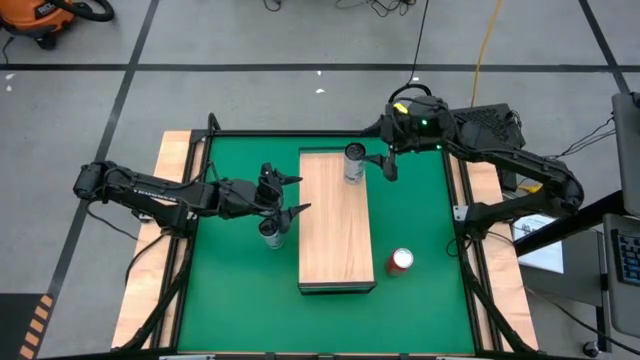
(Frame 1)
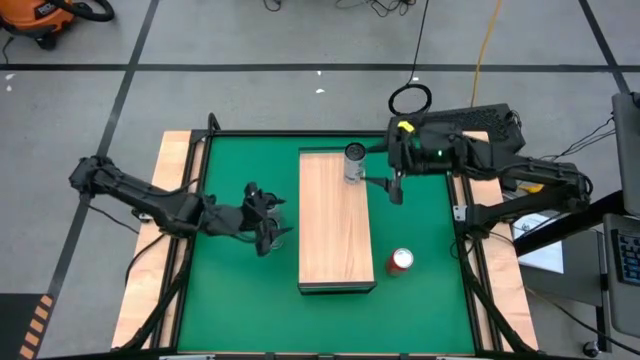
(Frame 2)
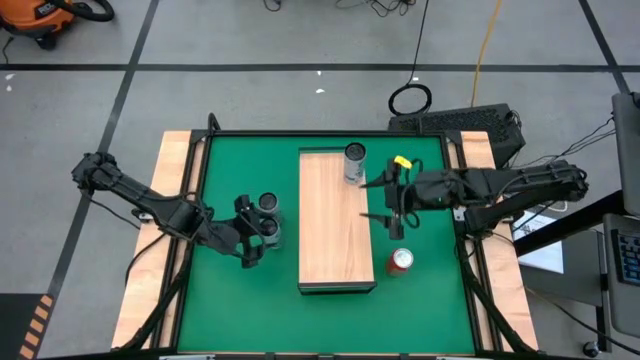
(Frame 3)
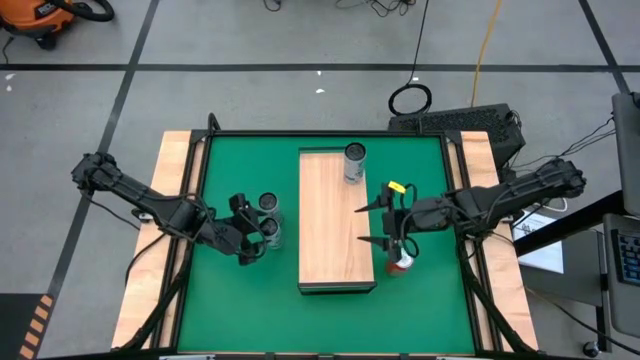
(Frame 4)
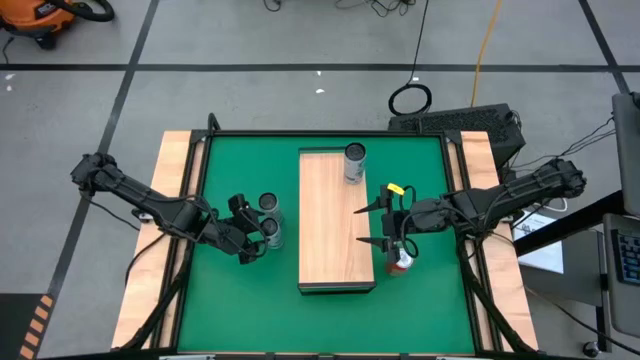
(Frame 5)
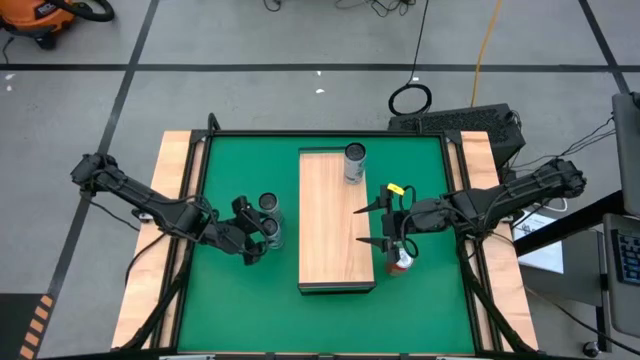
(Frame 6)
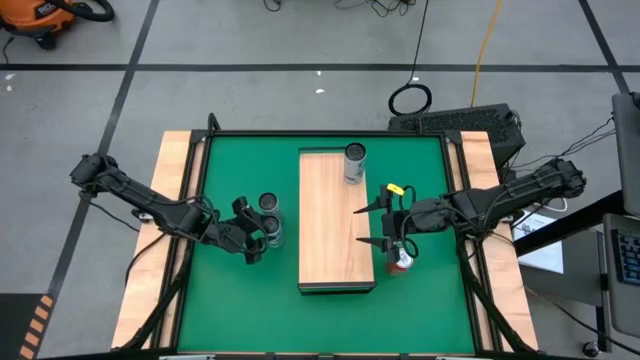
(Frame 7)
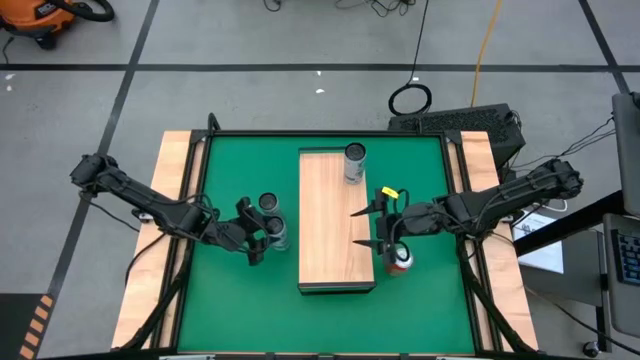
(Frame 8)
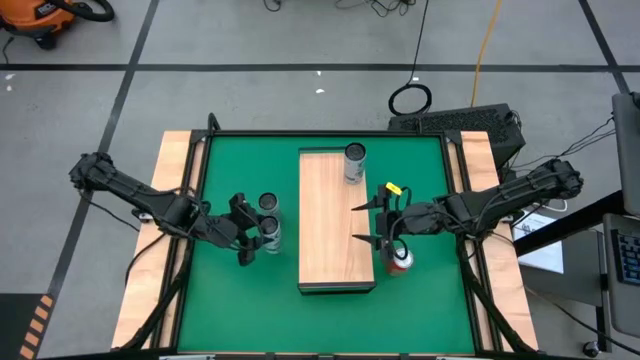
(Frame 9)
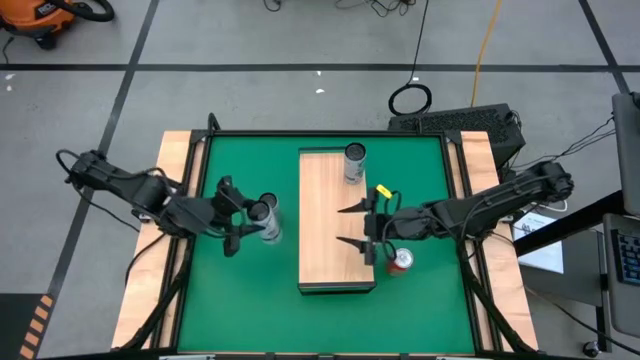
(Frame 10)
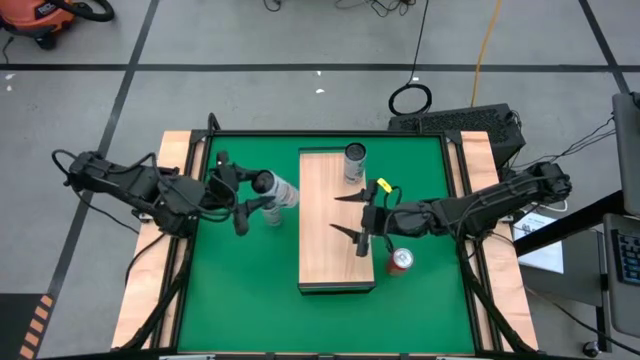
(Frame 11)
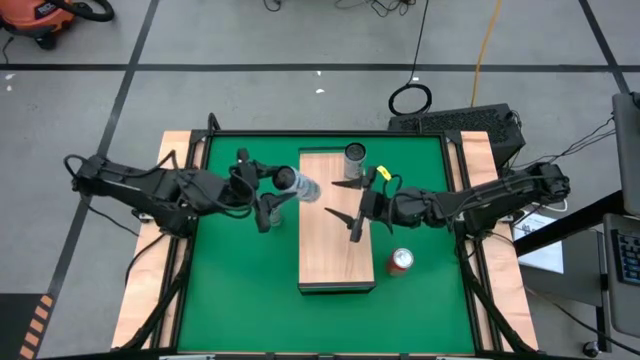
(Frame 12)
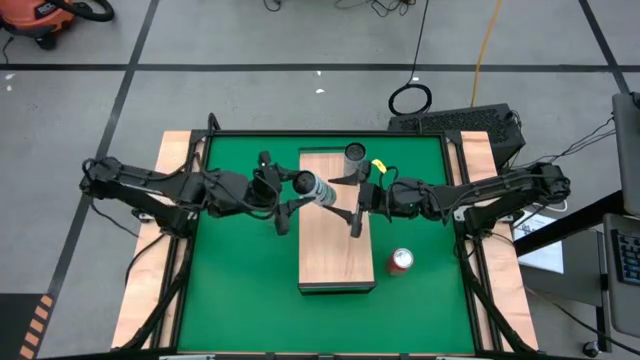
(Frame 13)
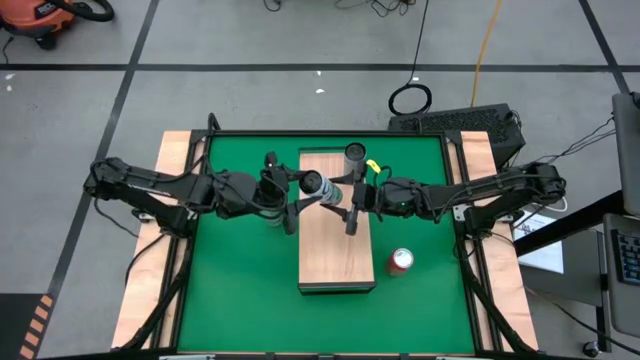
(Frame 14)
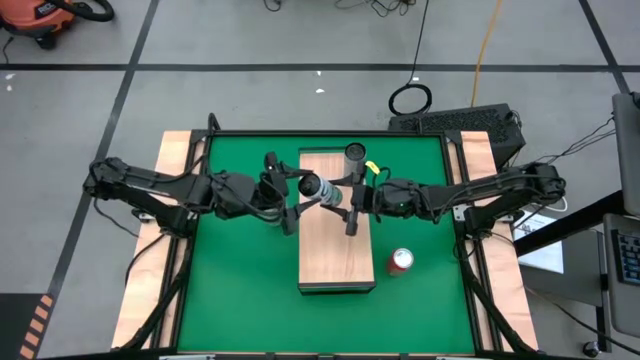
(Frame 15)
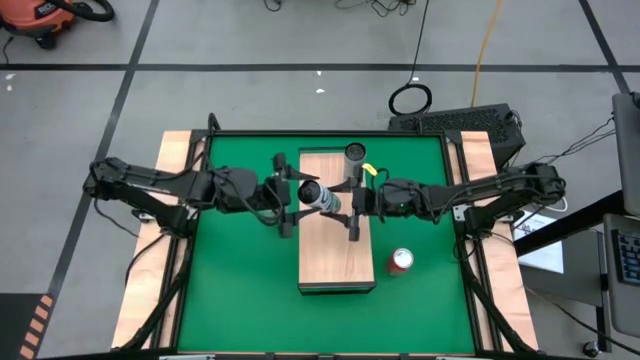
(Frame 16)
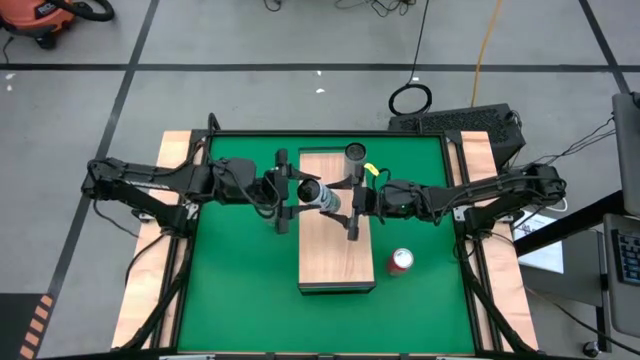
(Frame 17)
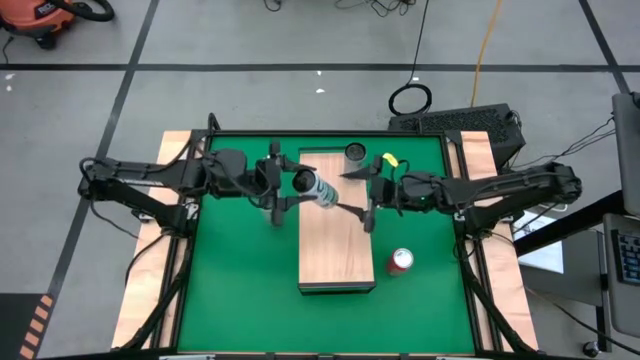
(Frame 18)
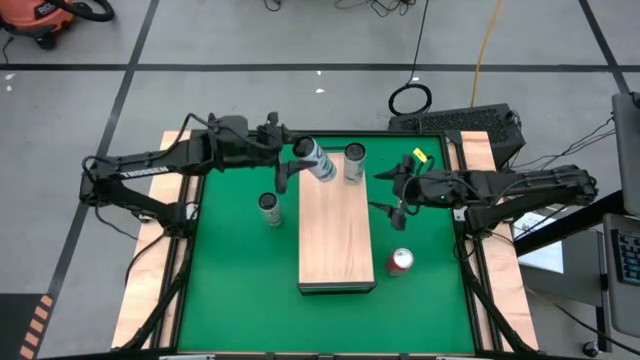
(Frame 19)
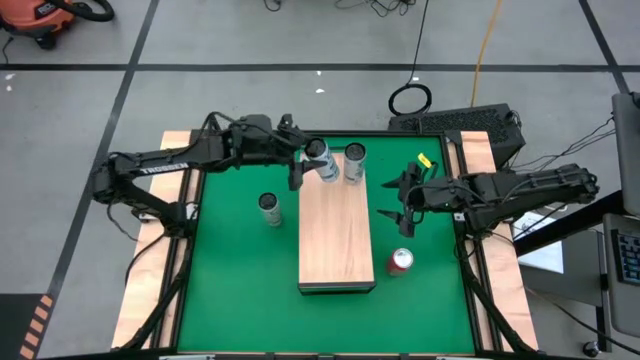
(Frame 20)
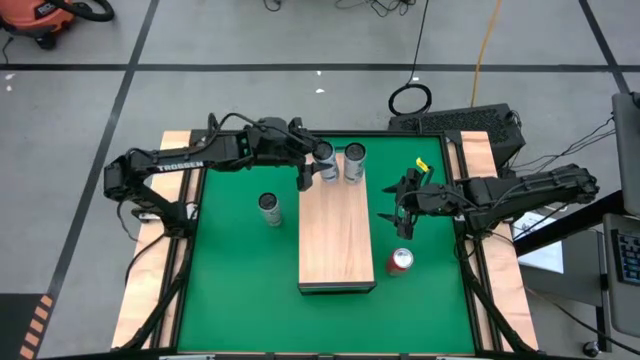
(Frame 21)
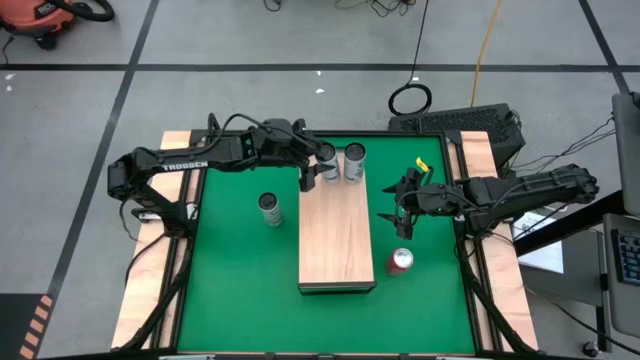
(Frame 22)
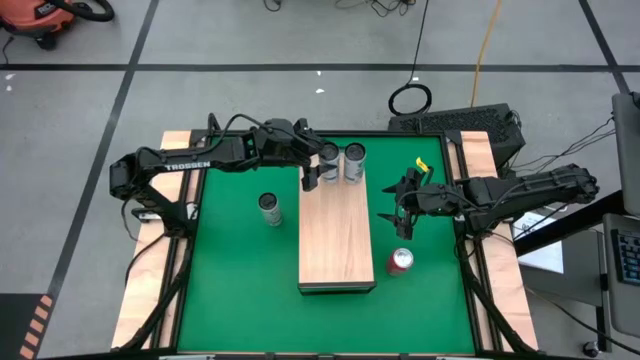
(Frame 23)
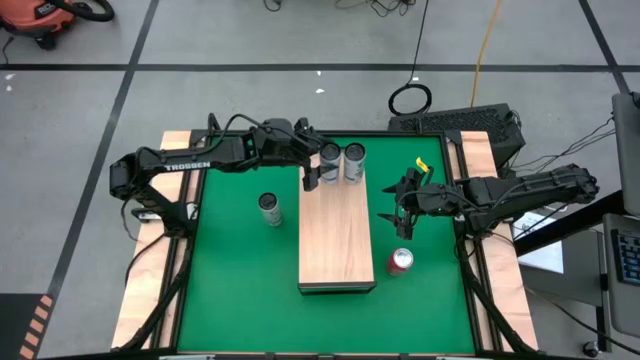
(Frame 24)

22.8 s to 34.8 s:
Task: Place canned beverage on shelf
Put the white-blue soda can on the shelf

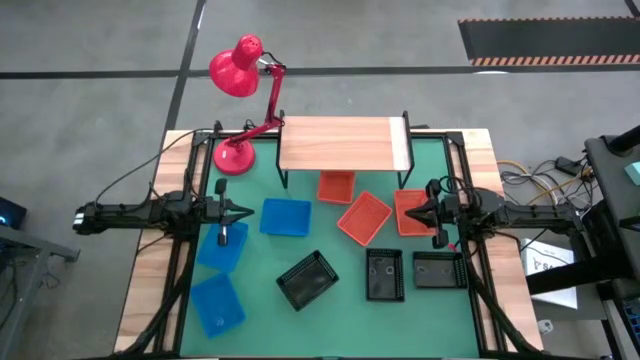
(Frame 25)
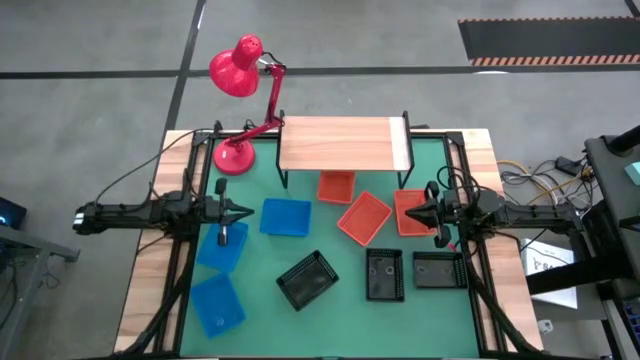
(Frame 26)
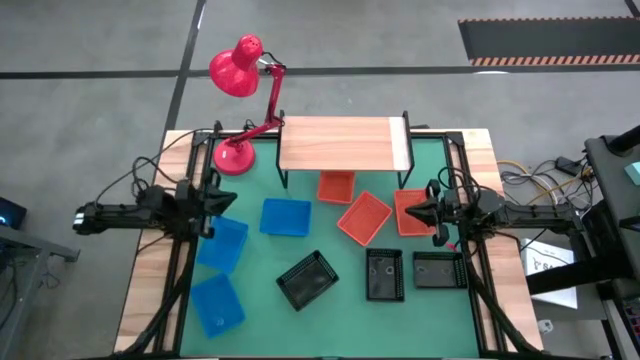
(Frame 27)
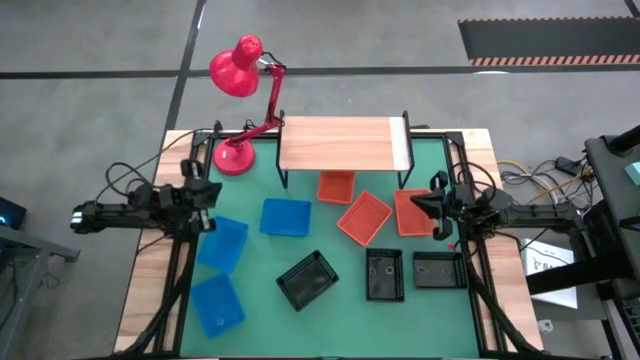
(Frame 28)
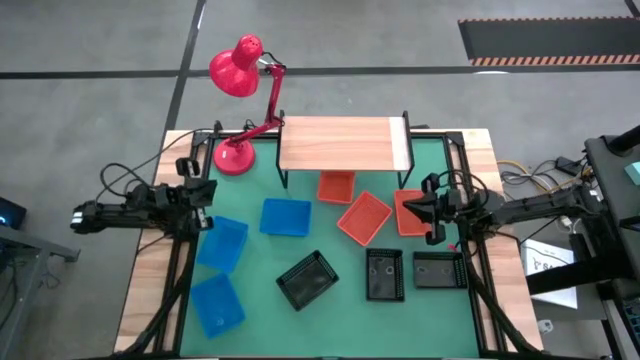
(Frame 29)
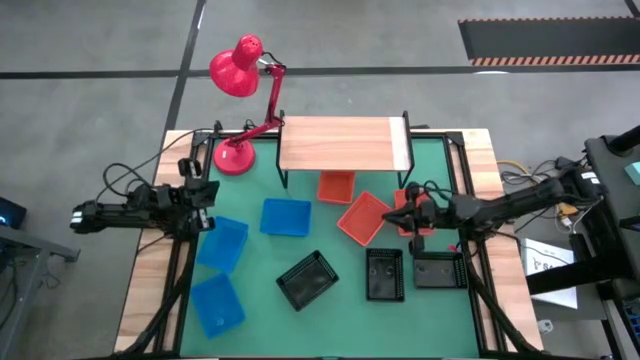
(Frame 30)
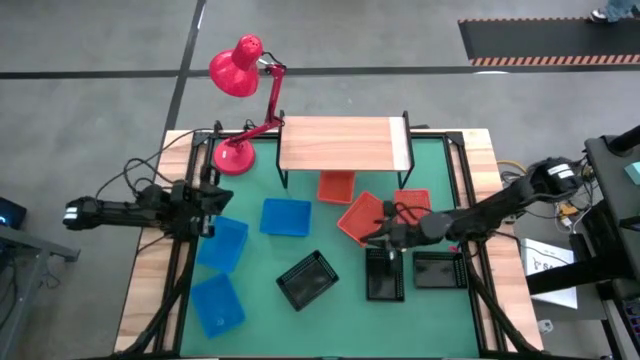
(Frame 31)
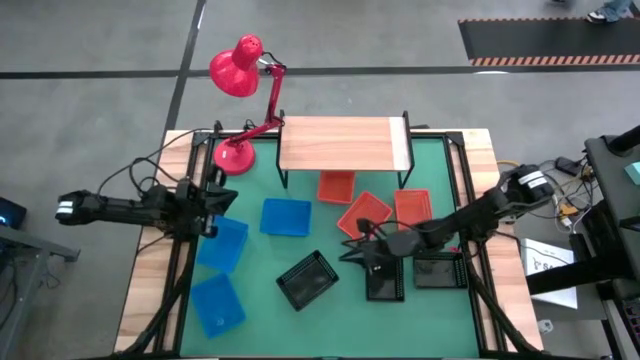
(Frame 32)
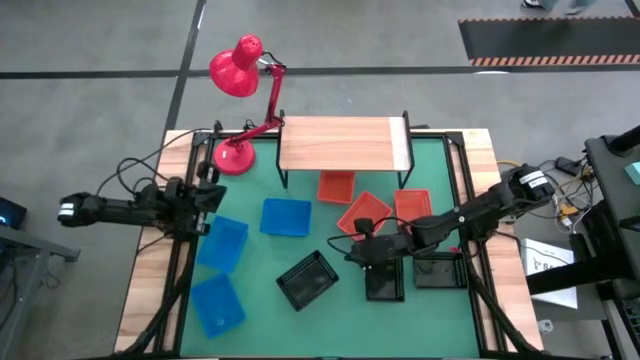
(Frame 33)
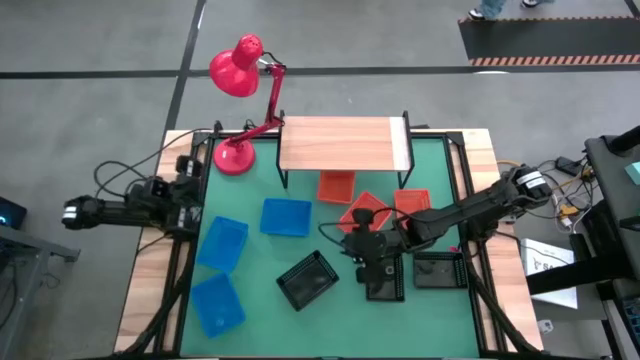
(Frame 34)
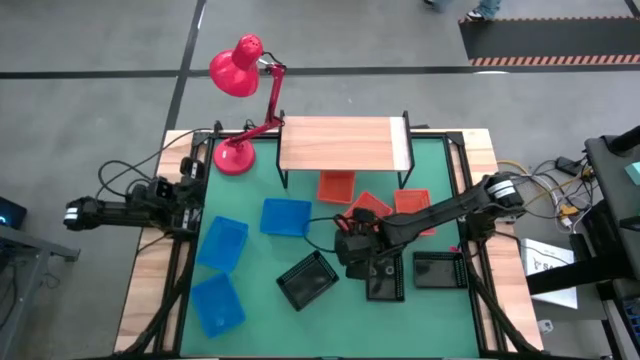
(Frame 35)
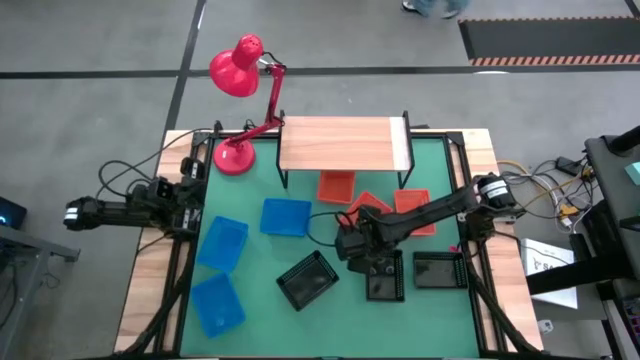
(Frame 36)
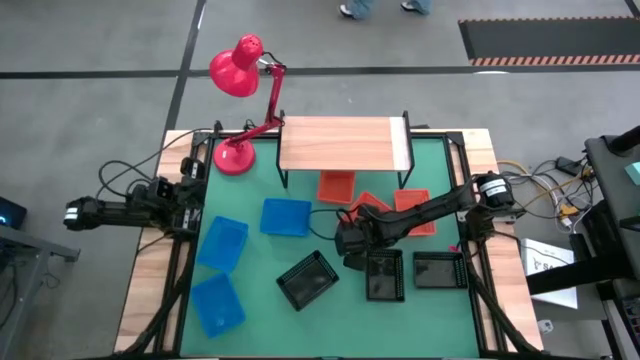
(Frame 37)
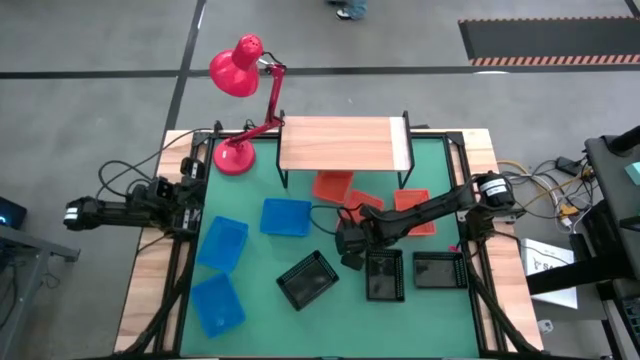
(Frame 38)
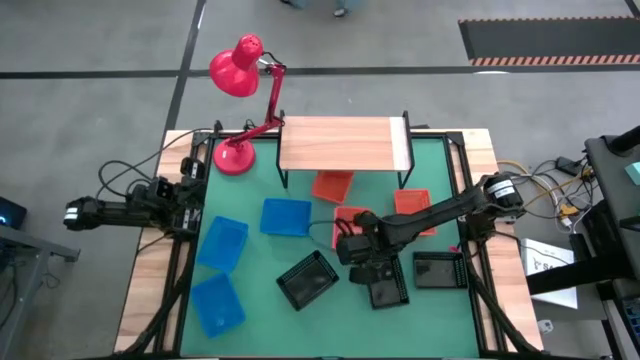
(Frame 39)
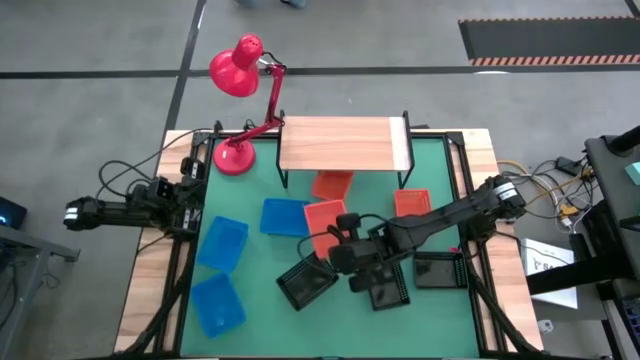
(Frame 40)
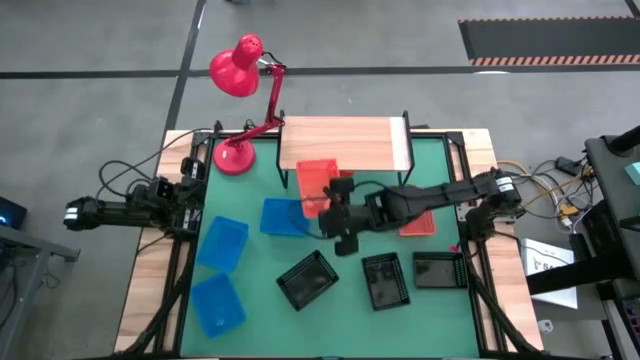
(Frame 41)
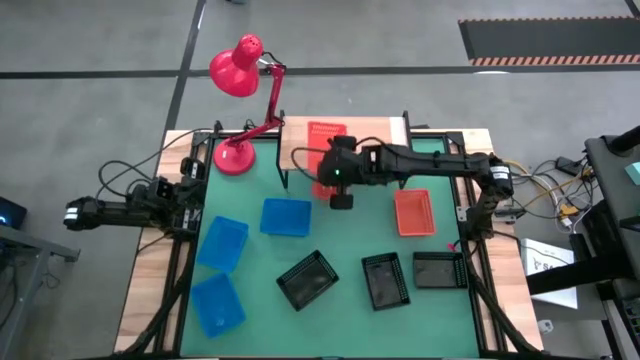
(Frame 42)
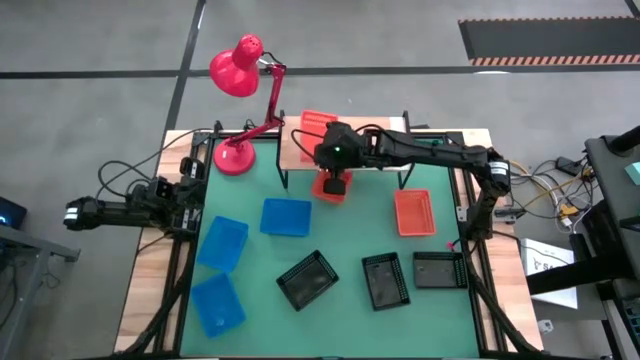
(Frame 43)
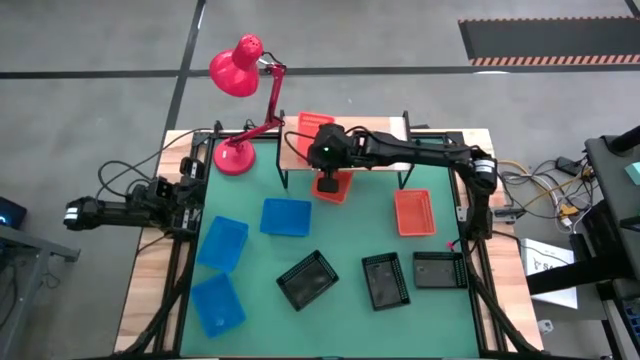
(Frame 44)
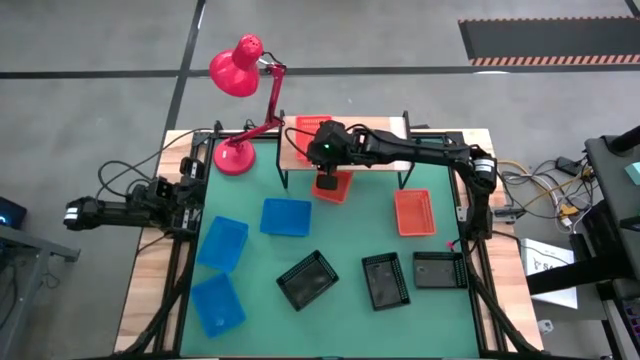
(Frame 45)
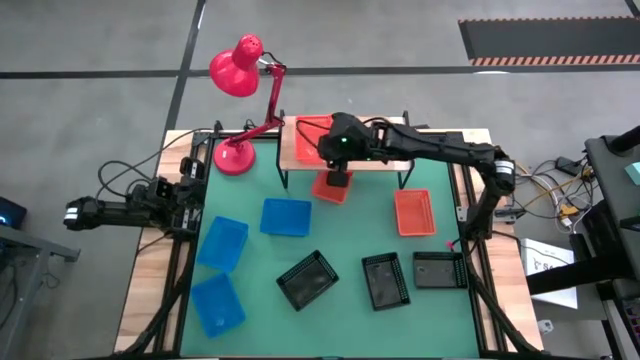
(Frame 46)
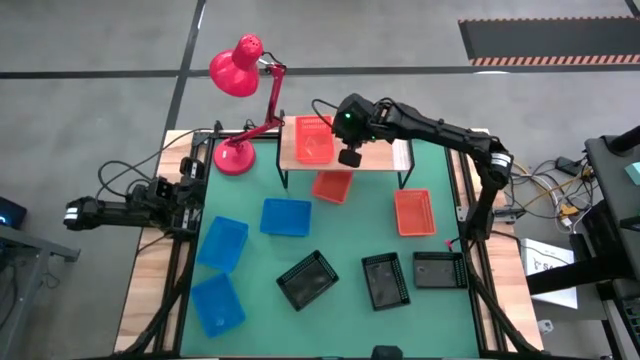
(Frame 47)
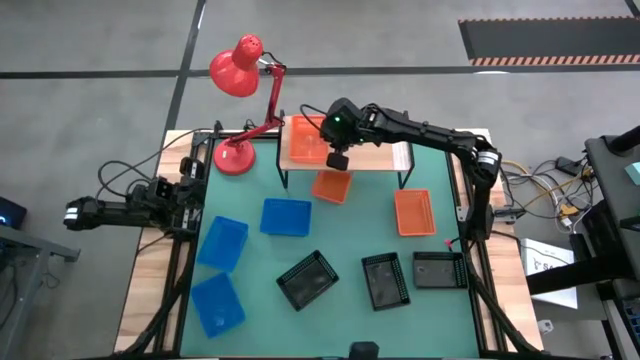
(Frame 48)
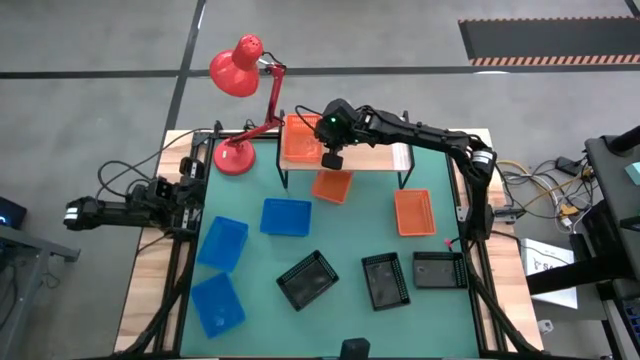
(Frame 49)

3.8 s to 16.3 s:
Task: Stack baskets on shelf by color
Put the bottom left orange bin on the shelf
